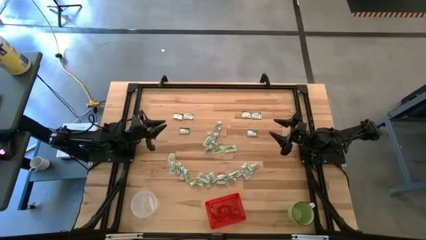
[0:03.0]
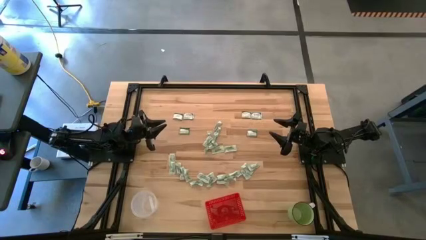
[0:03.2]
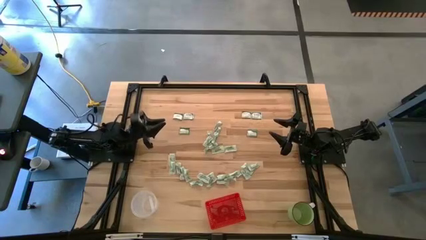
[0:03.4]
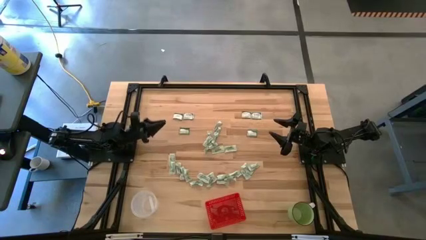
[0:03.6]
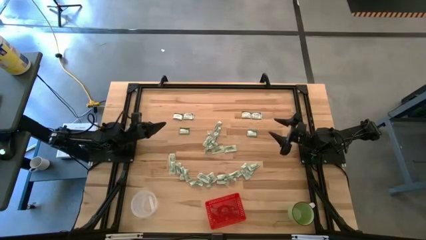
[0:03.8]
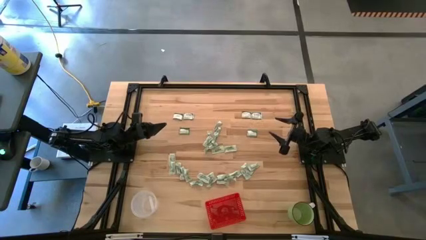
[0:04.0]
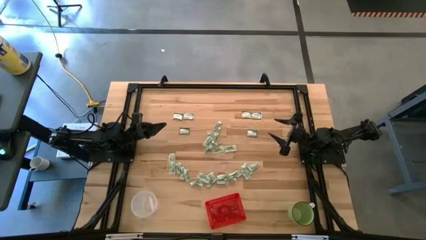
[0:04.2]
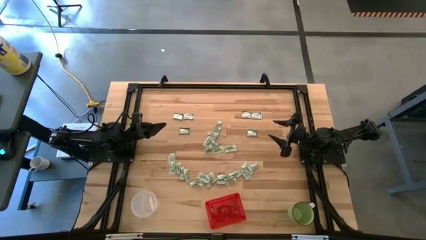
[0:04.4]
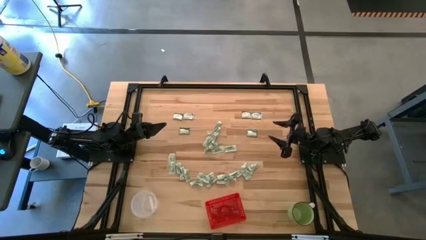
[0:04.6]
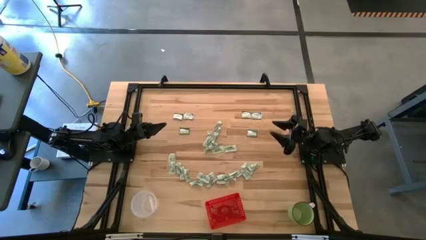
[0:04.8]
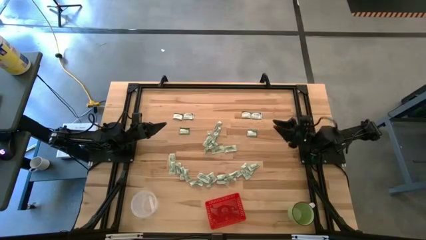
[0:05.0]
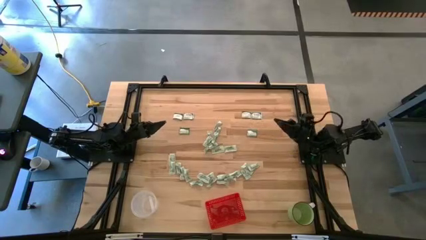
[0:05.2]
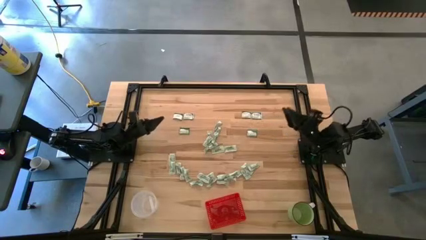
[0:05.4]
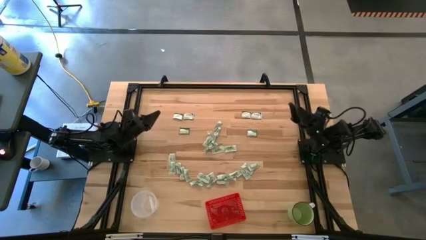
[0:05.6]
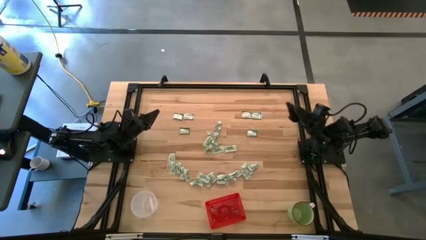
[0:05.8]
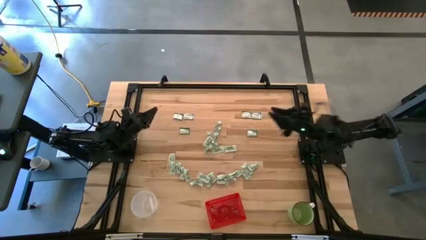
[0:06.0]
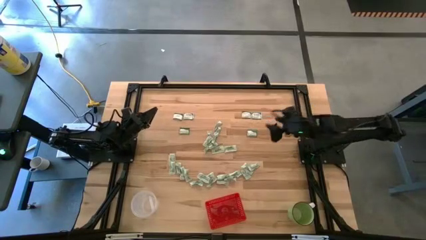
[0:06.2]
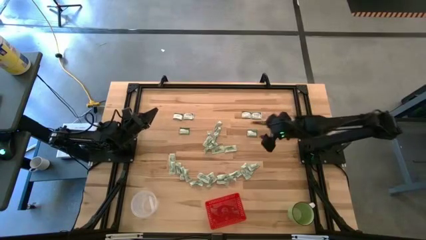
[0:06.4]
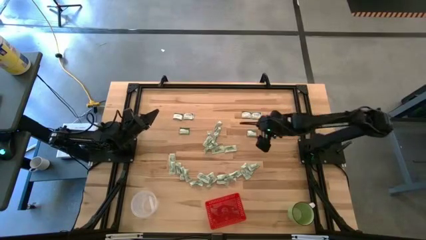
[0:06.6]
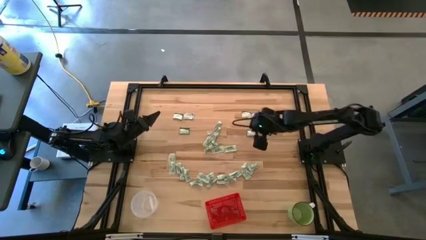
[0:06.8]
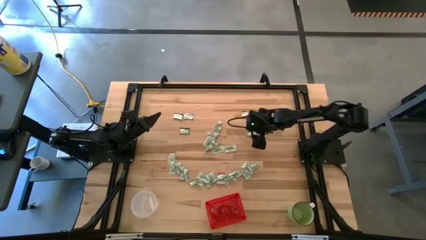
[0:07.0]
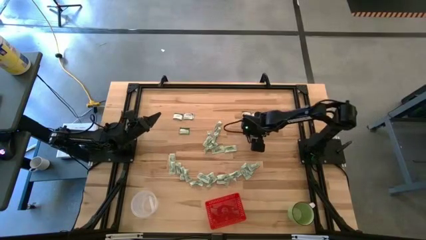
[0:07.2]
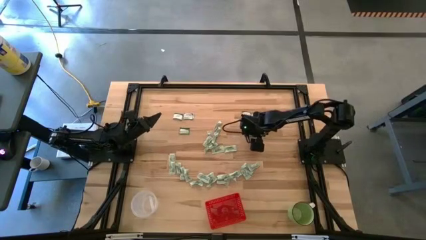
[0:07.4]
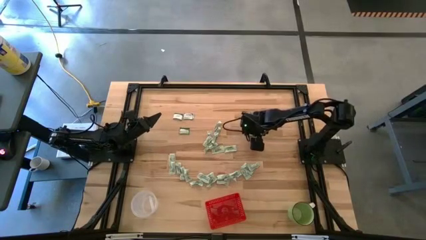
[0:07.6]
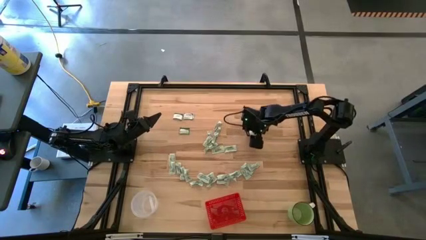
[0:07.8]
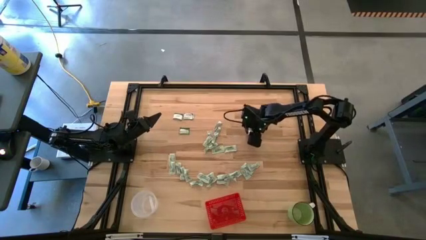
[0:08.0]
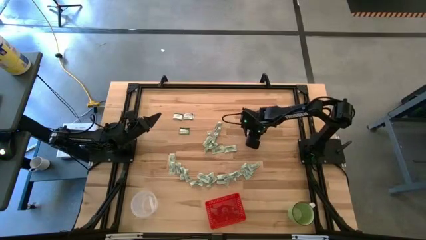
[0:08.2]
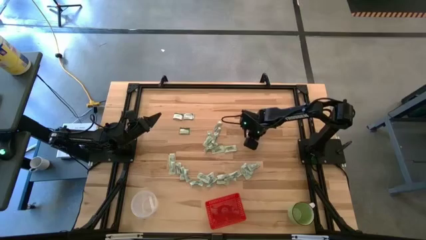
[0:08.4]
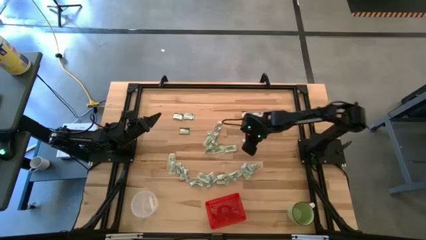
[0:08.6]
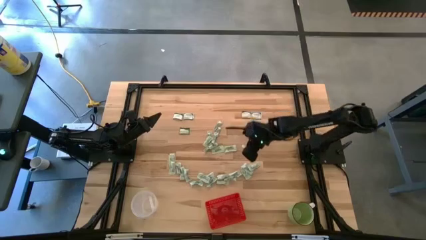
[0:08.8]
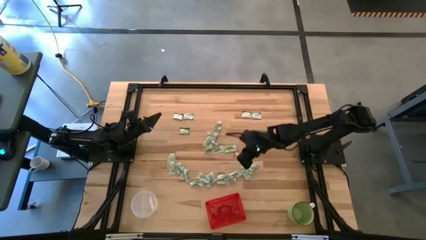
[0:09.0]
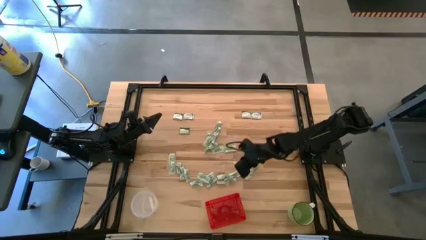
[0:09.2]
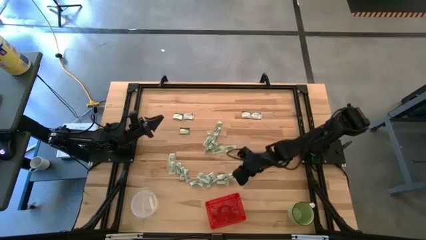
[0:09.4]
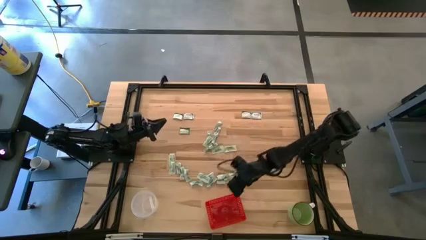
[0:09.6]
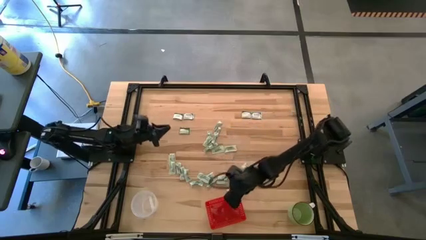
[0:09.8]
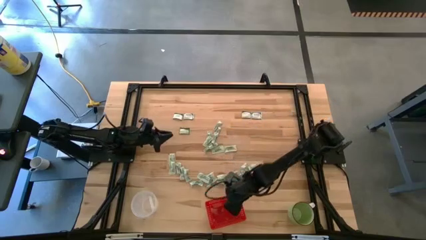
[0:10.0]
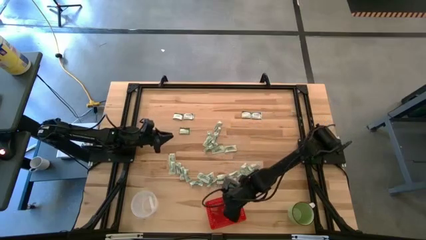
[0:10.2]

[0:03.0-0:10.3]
Task: Pick and place items into bin
Put the green stevia packet into the red bin

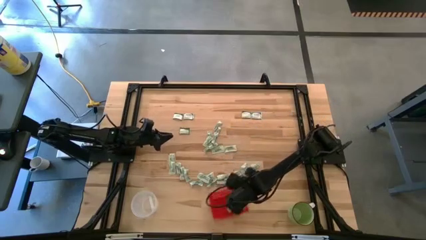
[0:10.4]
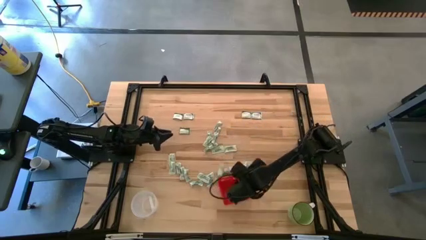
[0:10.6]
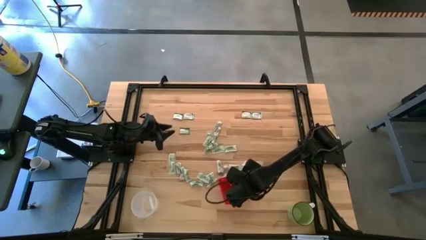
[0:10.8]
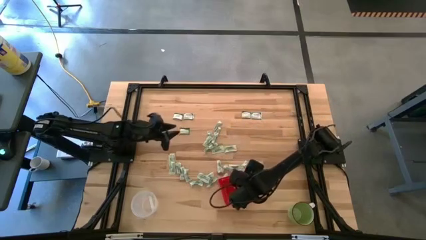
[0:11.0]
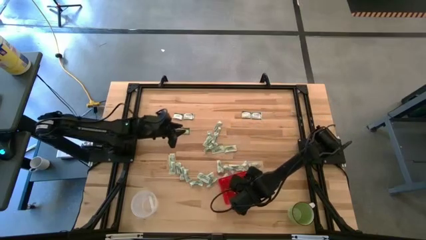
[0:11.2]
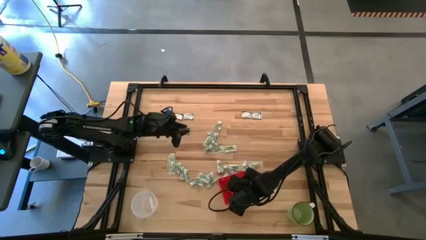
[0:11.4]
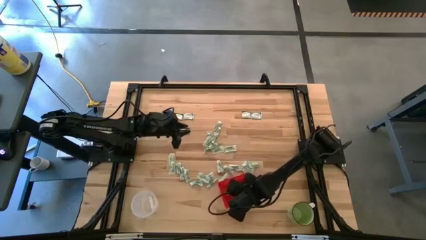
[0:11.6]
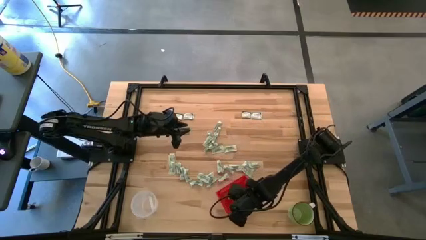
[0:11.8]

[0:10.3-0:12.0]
Adjust the red bin on the table

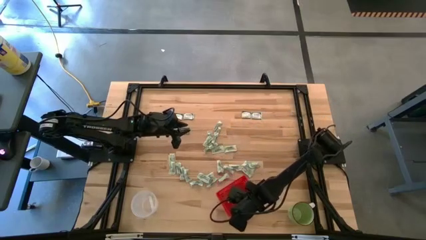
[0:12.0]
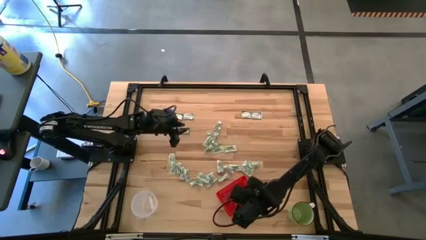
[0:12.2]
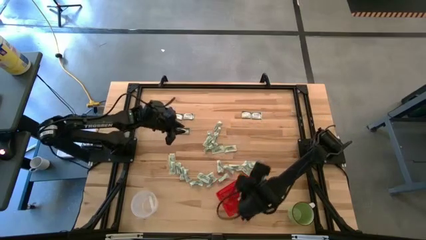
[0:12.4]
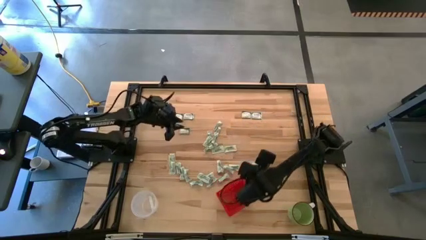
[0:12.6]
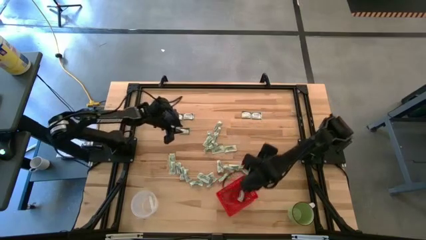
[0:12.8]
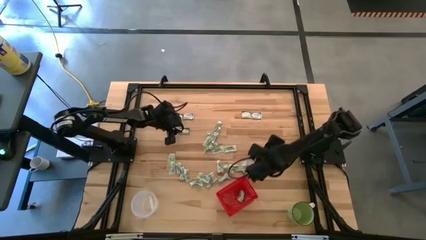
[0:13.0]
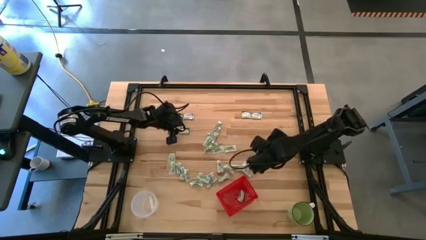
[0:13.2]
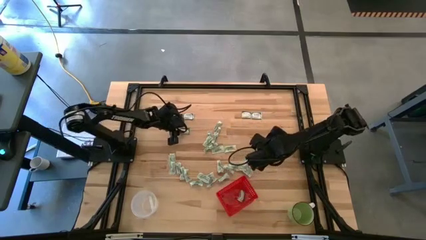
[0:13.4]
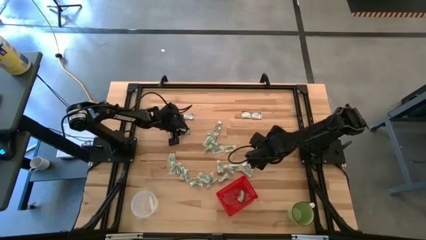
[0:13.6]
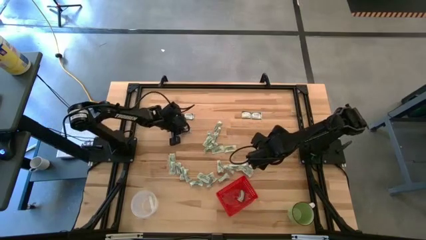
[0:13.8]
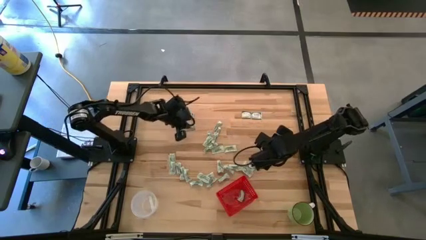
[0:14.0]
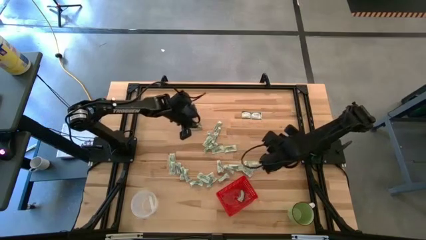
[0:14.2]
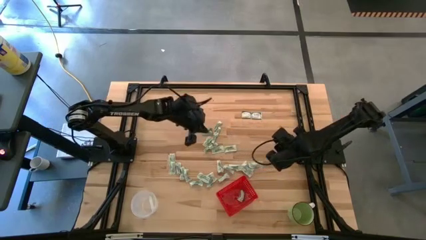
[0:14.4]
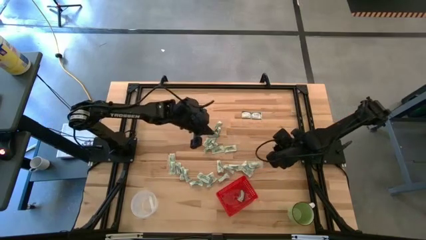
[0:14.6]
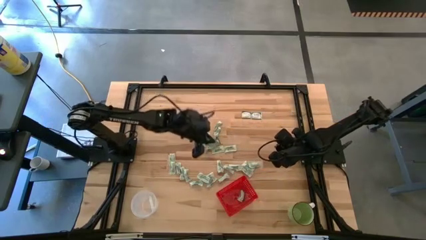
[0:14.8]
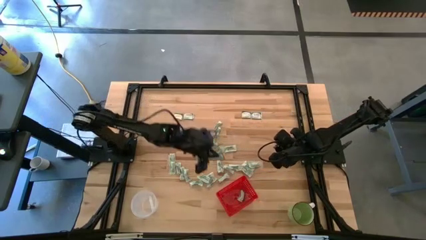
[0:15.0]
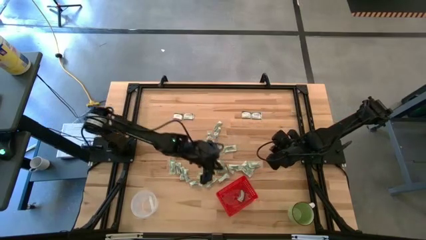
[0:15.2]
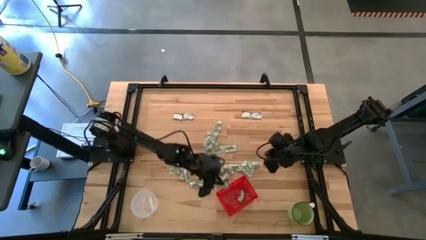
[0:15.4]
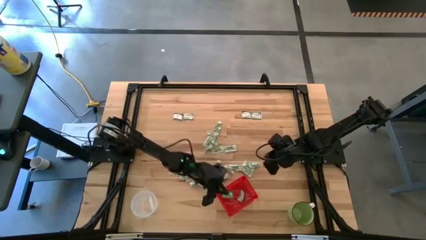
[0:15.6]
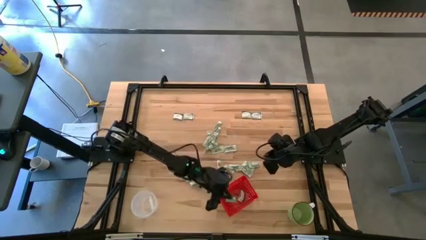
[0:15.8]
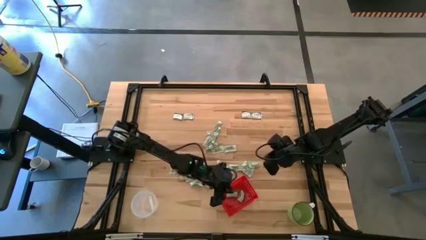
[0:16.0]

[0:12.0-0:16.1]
Put the green stevia packet into the red bin

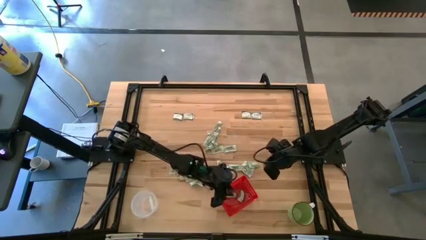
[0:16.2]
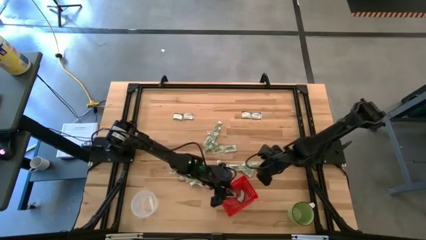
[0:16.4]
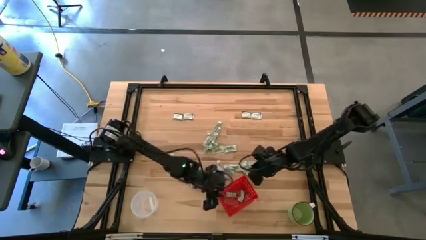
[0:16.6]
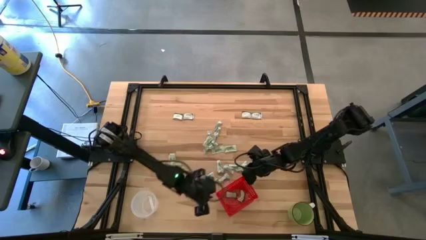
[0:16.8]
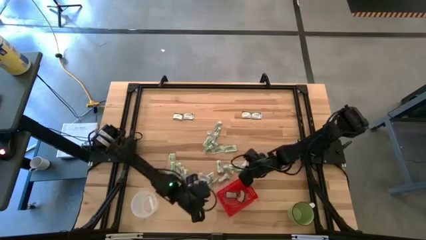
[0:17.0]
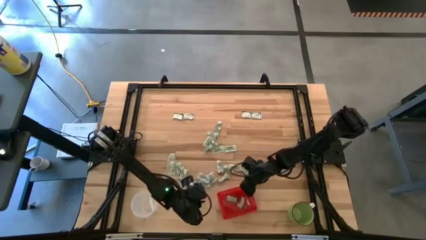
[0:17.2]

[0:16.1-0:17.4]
Adjust the red bin on the table

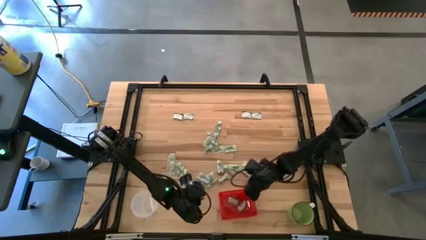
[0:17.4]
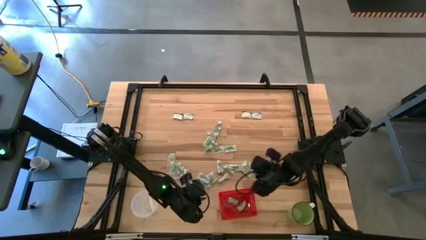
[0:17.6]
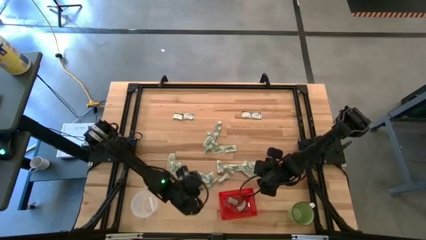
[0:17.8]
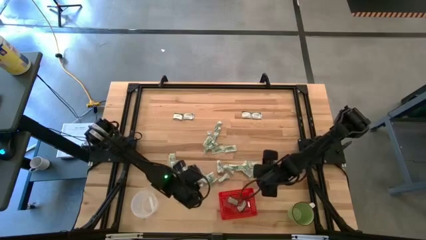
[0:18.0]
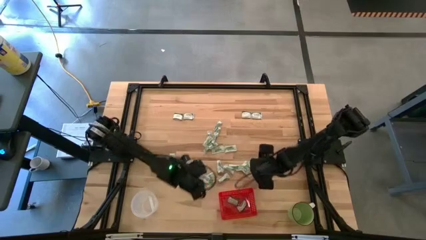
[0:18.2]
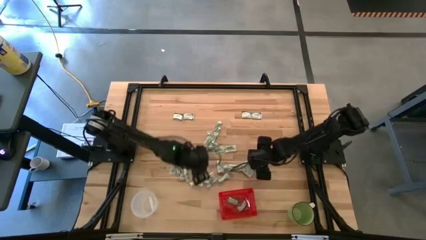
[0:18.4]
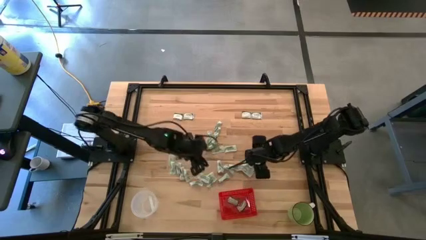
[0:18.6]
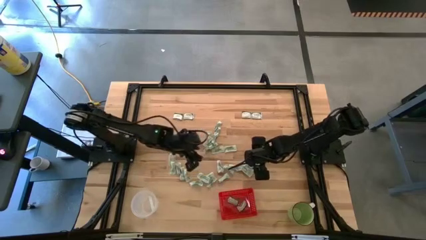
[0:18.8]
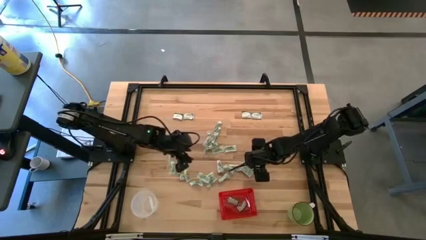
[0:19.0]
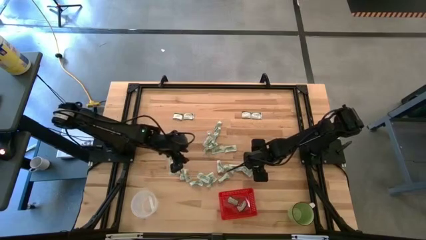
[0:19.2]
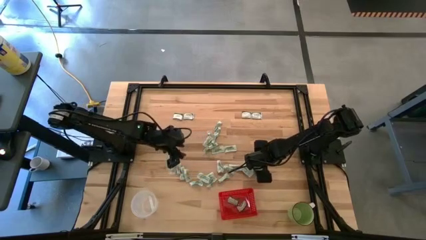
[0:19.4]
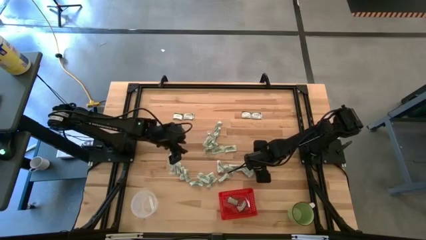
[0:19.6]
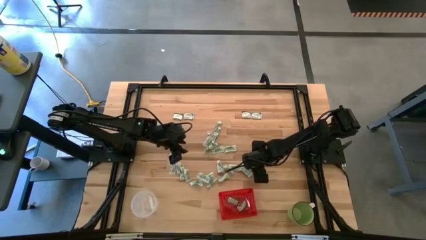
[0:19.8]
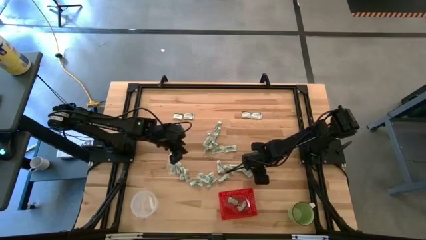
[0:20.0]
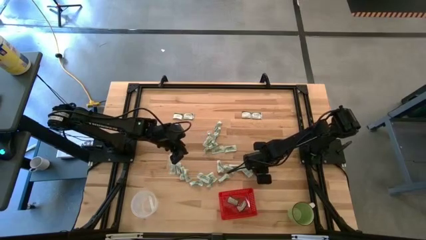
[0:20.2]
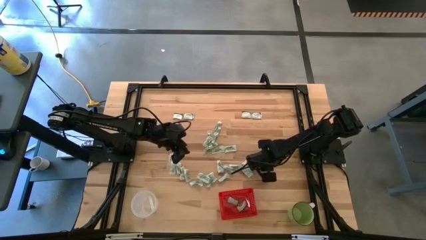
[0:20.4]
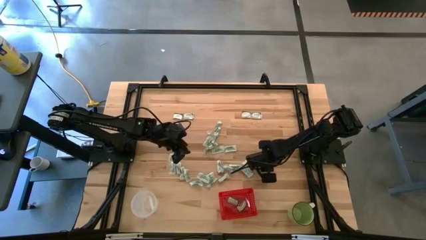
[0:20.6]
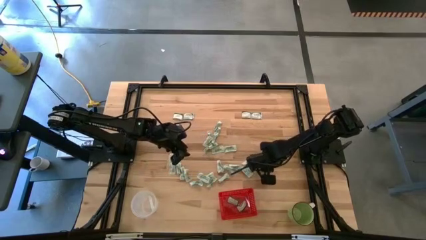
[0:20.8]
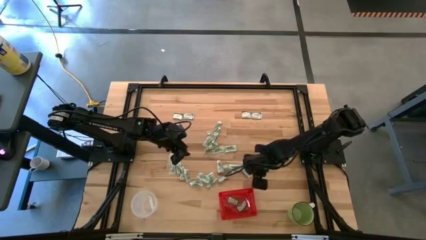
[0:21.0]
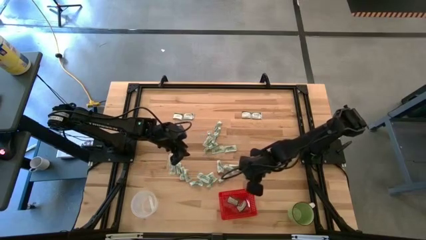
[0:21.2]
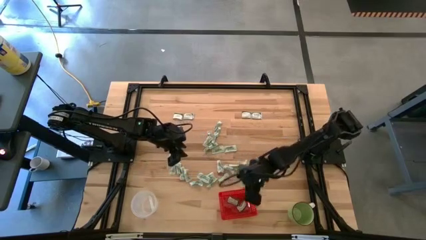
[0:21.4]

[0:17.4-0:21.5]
Put the white stevia packet into the red bin
